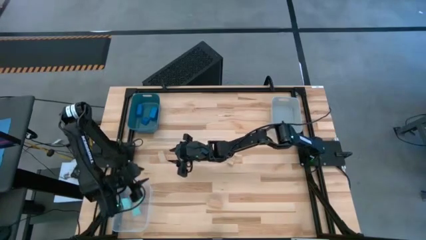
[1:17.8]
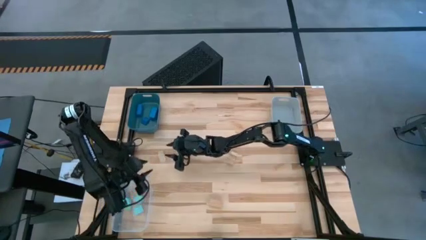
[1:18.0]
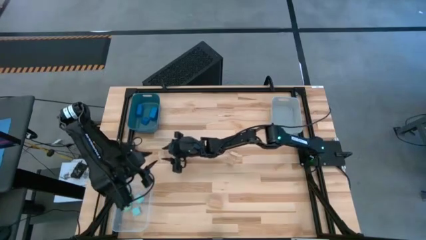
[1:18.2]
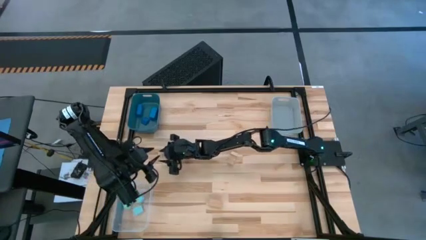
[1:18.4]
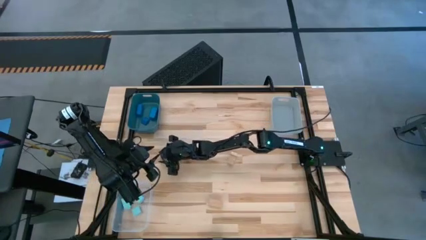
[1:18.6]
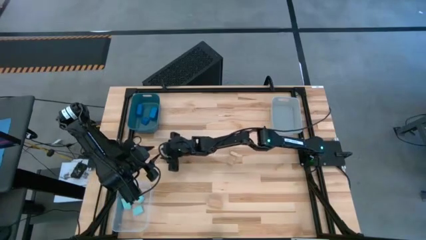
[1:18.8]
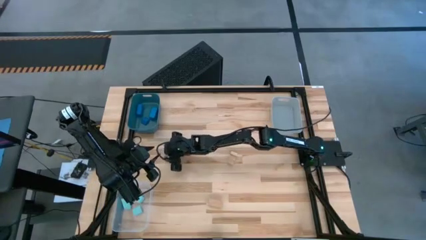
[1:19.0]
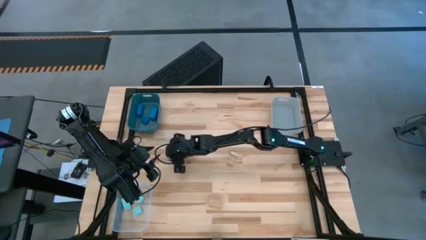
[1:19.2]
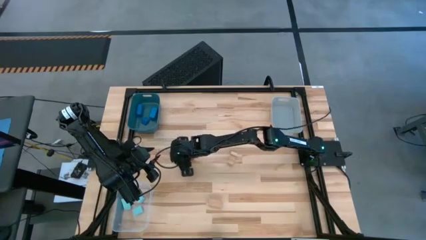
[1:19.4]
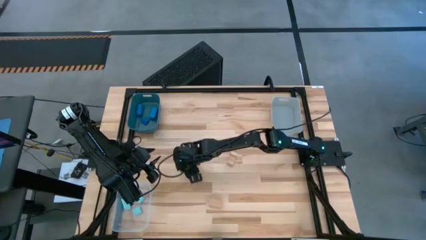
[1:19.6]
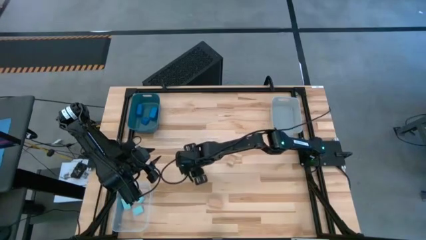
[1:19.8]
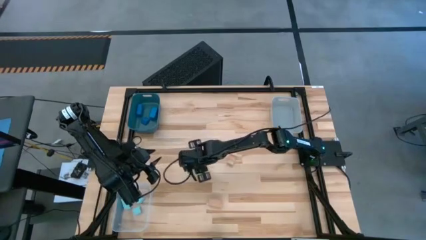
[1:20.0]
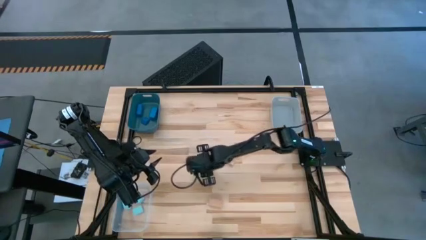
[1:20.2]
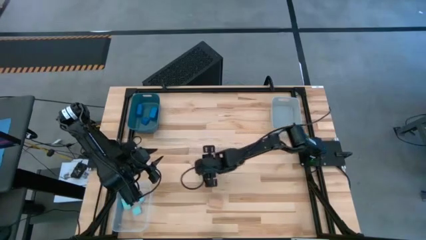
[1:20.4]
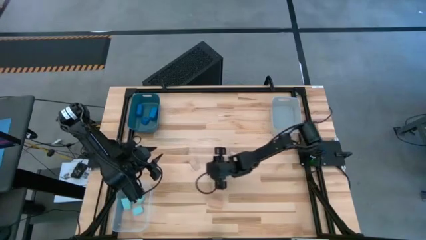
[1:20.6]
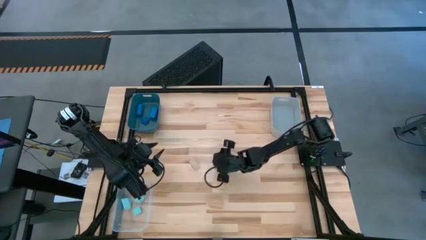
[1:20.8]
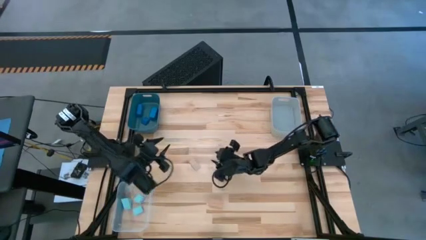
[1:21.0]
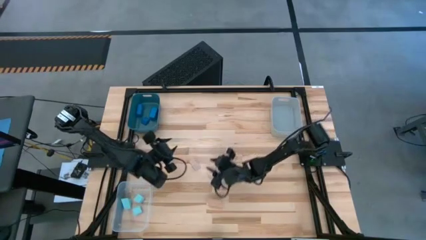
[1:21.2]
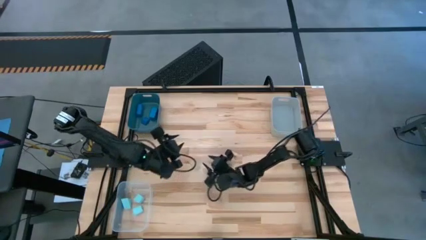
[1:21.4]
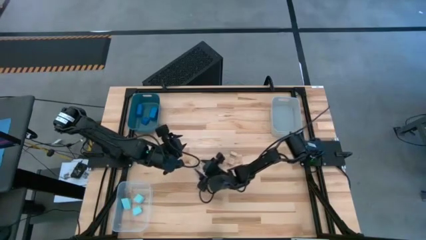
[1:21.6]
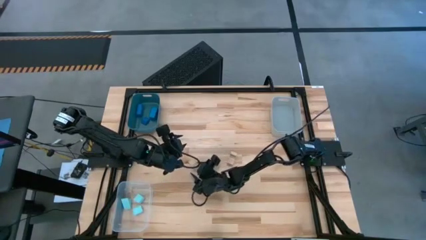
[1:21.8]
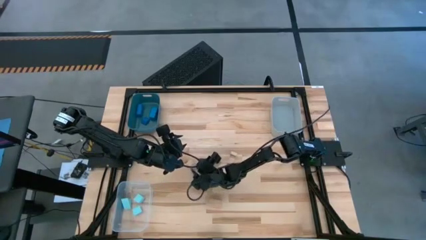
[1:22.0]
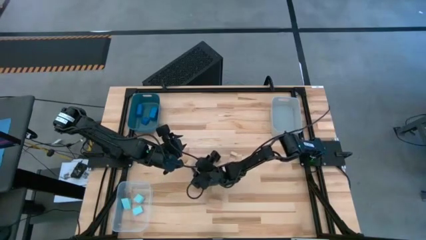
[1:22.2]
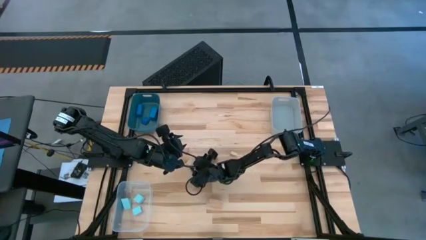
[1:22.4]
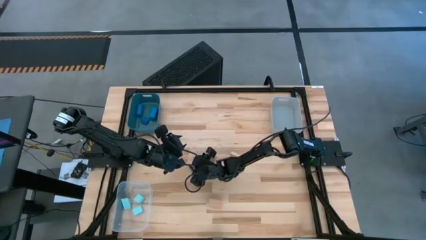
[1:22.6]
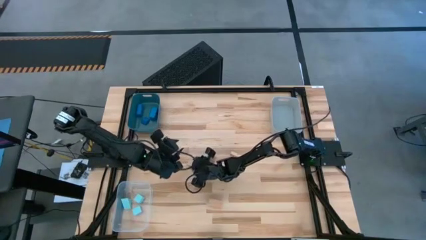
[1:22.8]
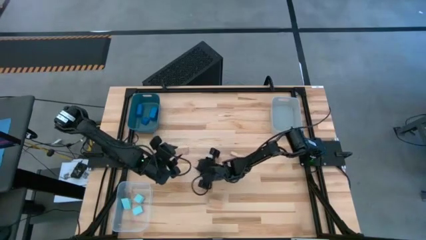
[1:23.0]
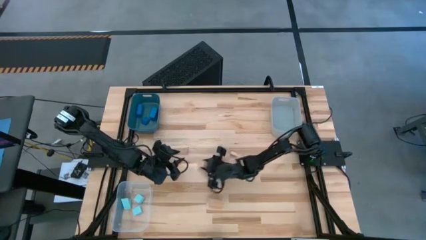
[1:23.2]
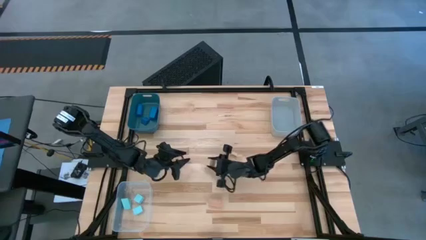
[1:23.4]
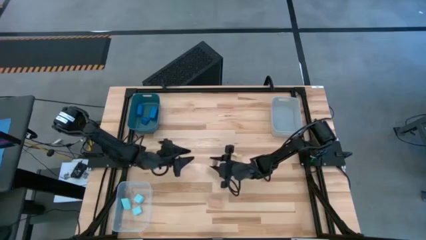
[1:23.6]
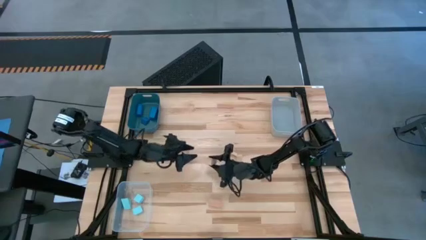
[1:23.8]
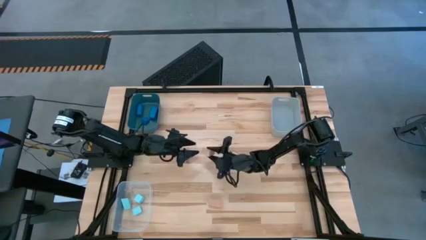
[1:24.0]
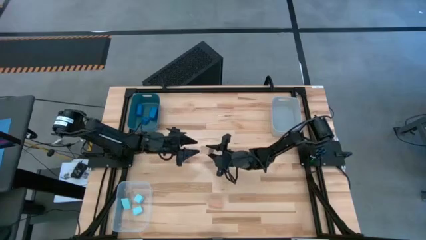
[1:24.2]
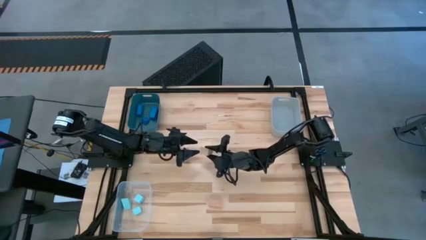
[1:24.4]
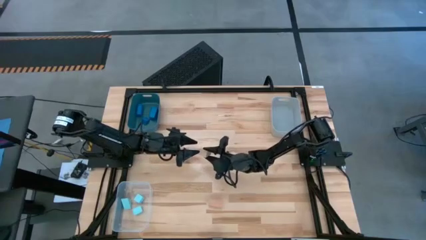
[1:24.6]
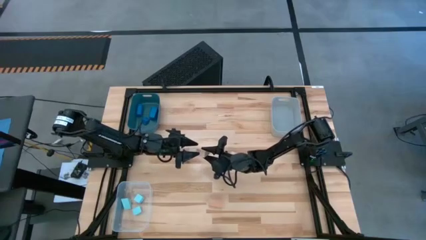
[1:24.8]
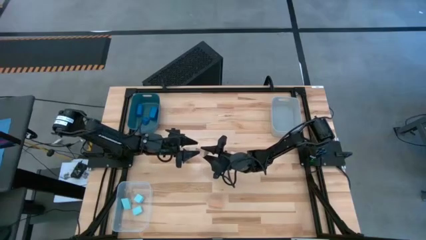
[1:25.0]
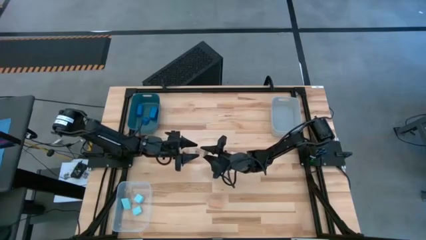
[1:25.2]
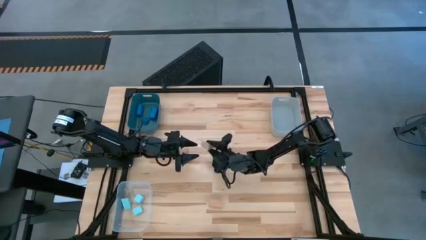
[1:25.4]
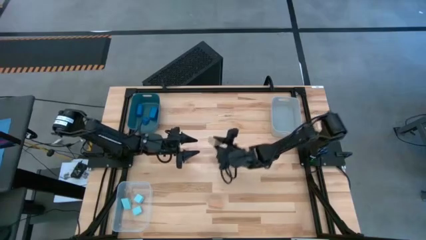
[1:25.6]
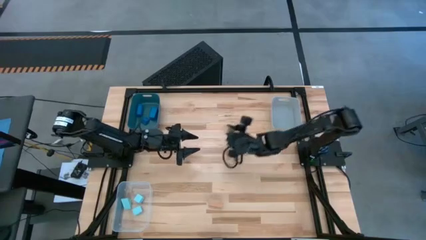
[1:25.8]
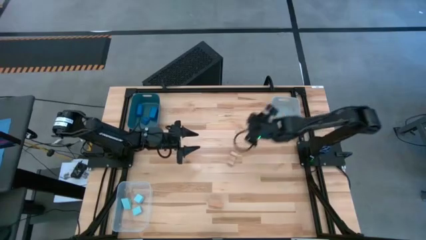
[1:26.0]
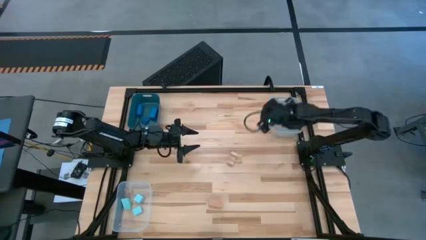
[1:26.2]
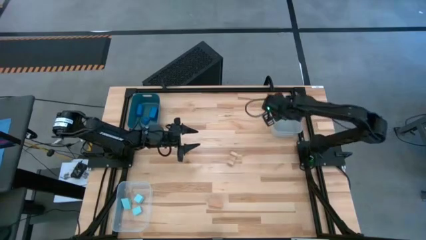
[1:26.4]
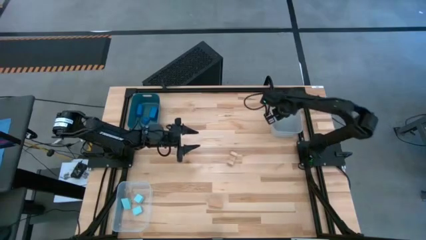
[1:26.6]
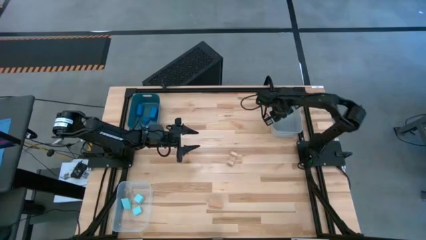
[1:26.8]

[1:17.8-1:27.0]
Task: Sort & place blocks by color
Put the top left brown block into the grey bin

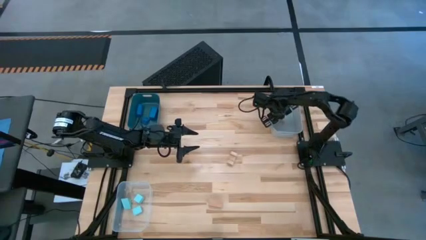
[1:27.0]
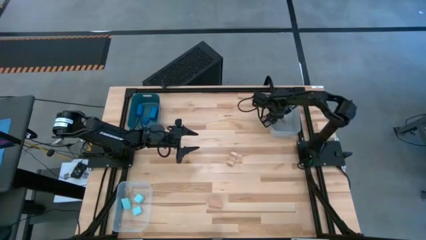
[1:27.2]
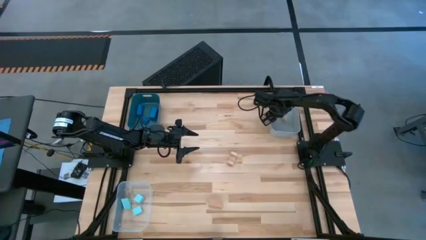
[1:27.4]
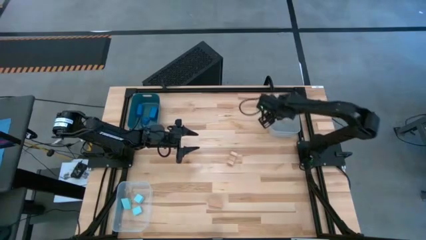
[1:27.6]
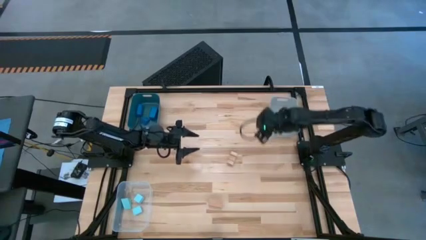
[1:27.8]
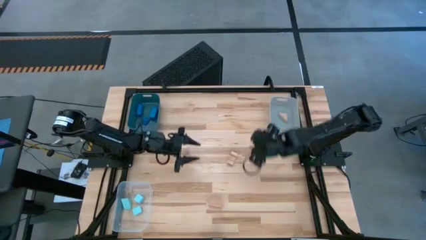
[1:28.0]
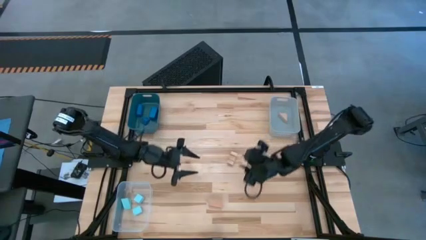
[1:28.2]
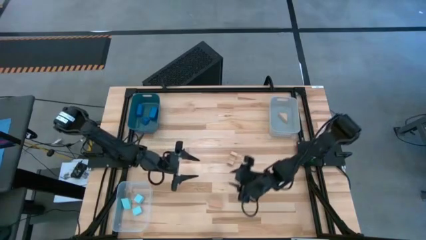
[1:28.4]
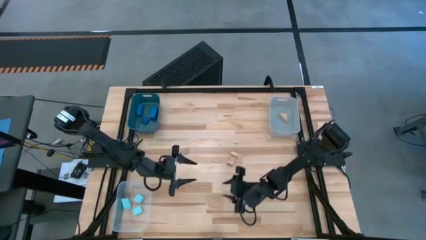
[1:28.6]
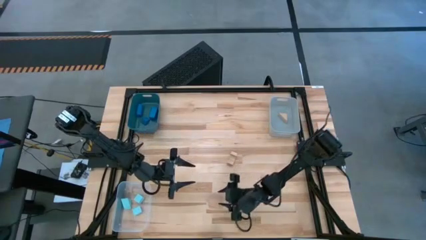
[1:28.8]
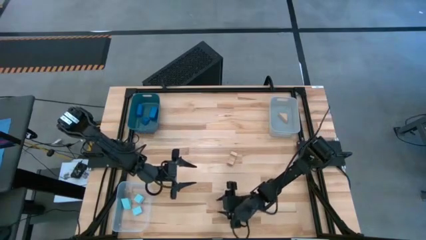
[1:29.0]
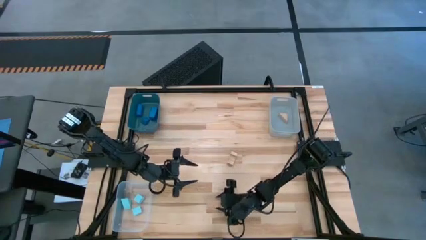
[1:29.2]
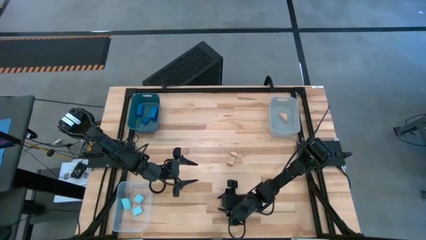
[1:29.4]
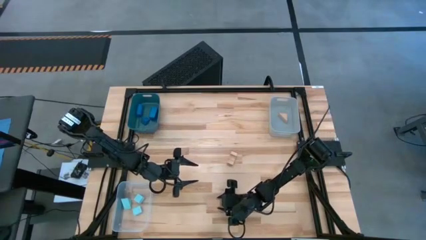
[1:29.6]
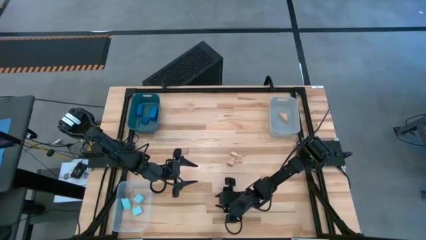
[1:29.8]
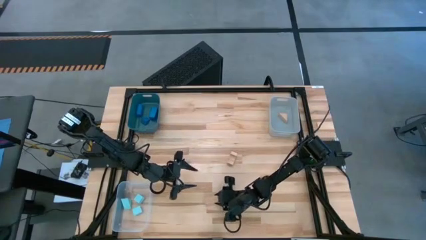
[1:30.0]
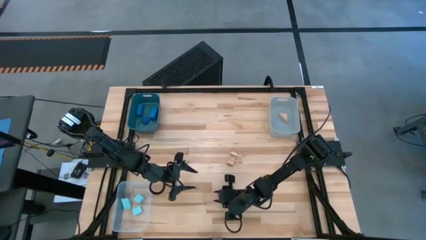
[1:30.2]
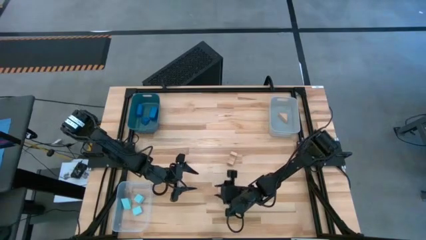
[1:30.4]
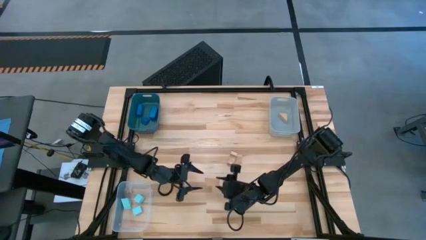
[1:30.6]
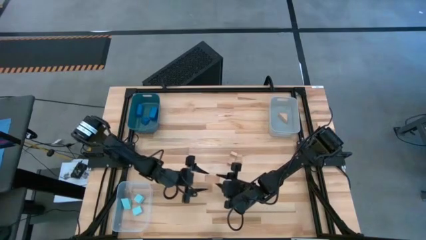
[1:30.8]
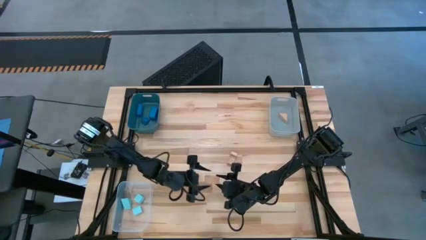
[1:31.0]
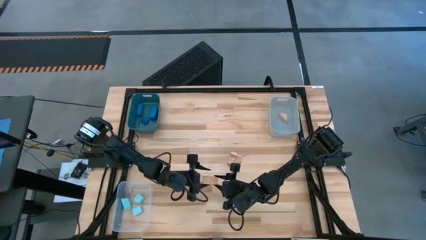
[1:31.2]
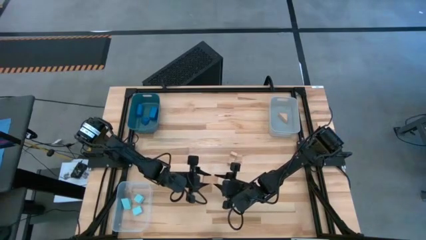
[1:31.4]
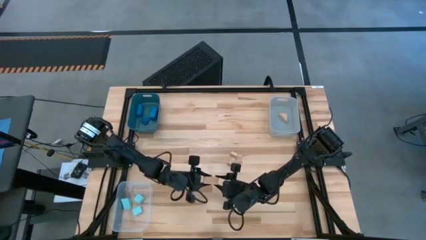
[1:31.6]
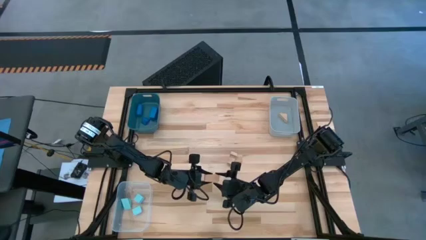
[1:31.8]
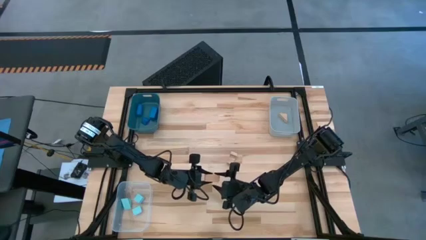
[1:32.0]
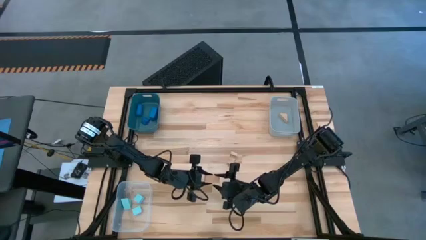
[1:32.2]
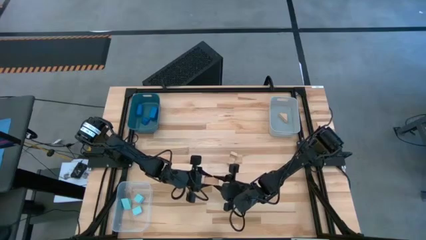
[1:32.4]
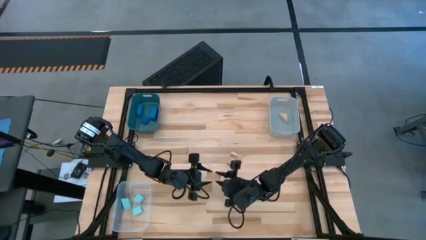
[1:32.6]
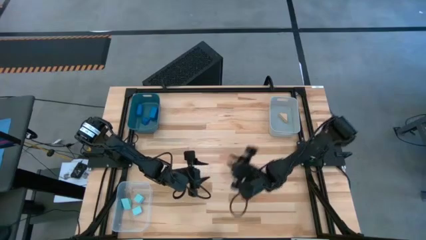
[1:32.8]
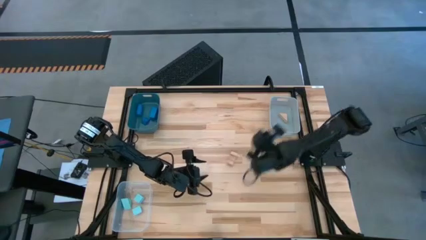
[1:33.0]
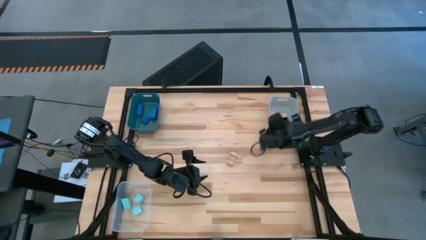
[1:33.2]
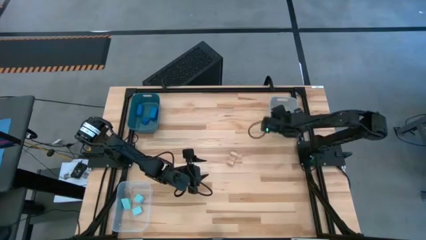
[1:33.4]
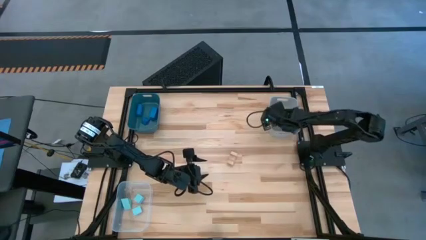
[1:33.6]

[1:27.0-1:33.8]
Put the bottom brown block into the grey bin

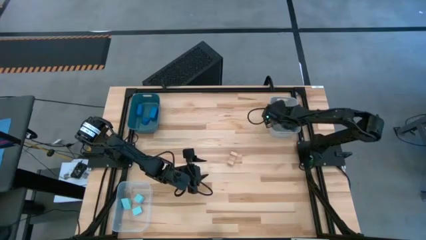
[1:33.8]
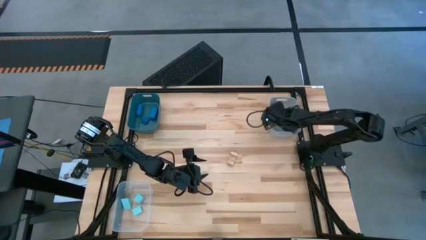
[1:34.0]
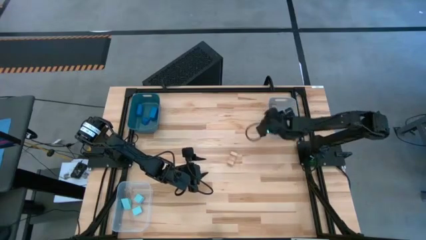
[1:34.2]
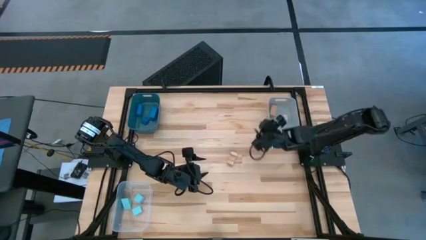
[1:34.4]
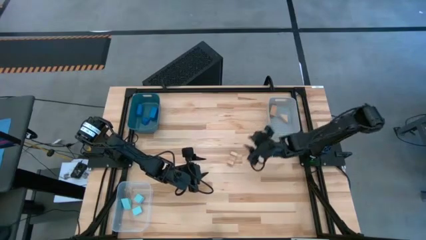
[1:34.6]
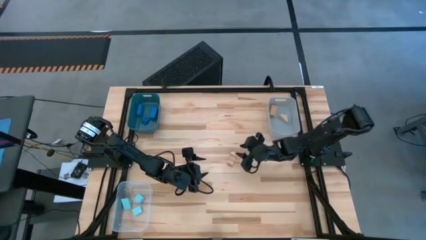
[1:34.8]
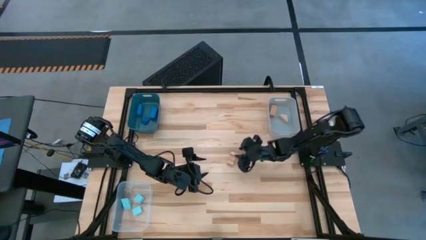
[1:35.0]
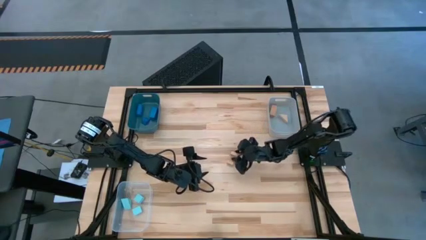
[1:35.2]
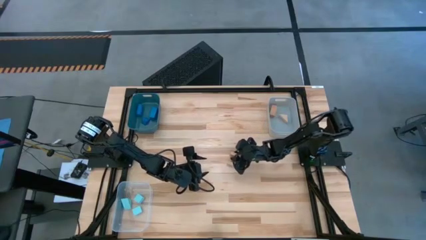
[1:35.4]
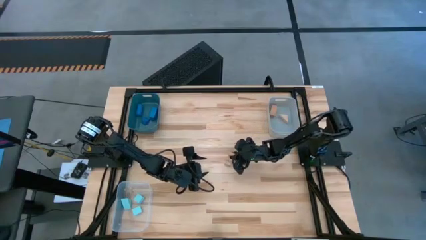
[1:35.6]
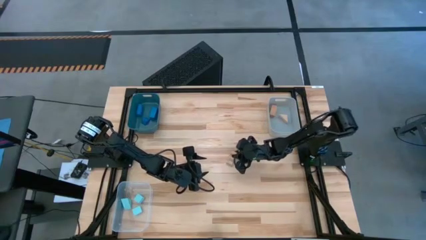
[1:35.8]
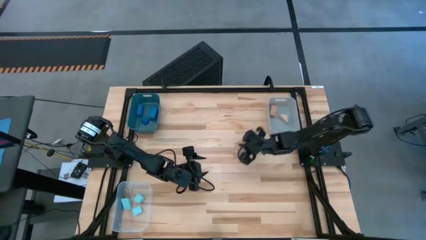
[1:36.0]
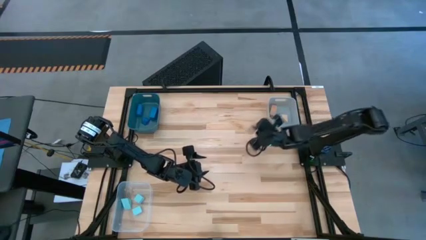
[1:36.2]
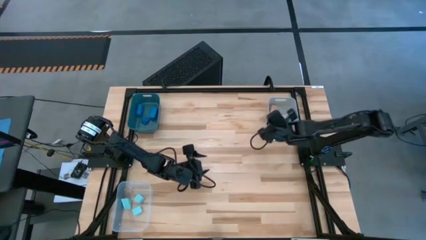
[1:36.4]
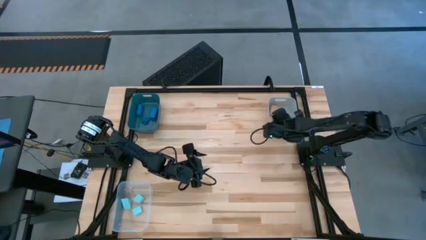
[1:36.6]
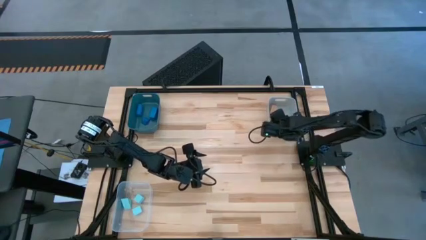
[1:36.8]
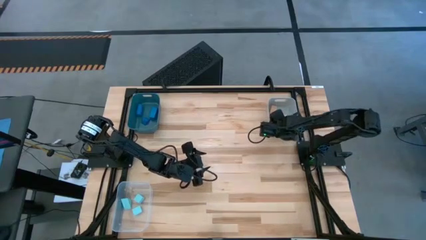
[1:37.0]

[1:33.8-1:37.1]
Put the brown block into the grey bin
